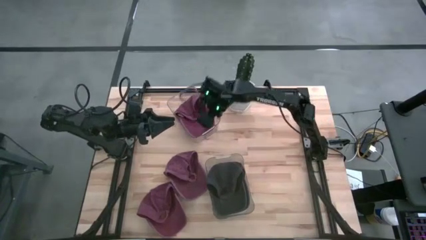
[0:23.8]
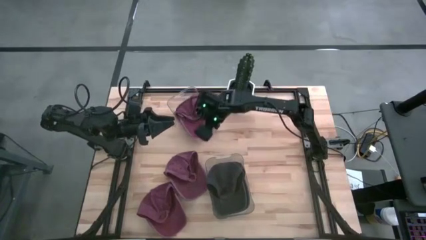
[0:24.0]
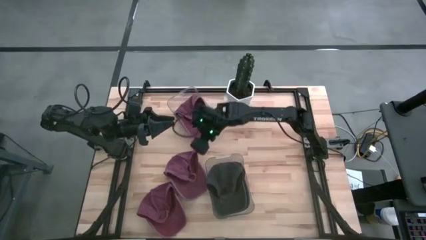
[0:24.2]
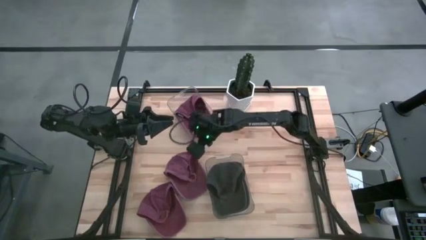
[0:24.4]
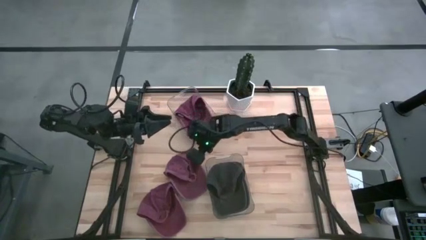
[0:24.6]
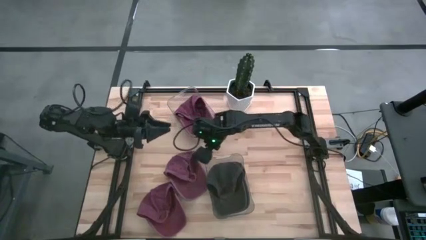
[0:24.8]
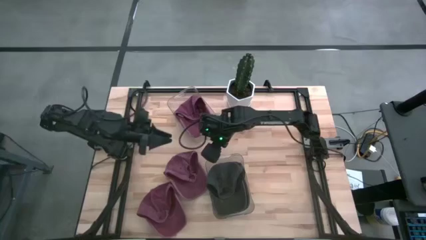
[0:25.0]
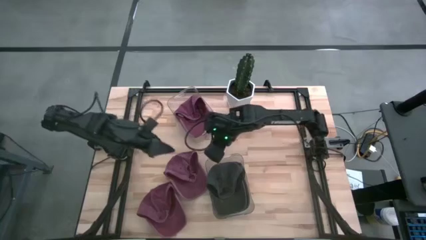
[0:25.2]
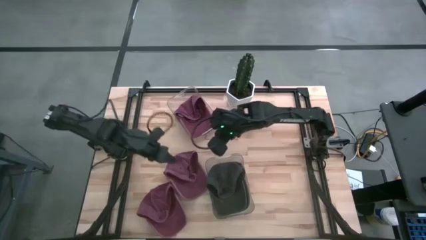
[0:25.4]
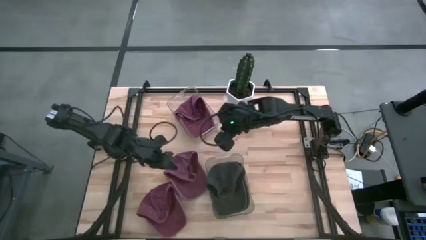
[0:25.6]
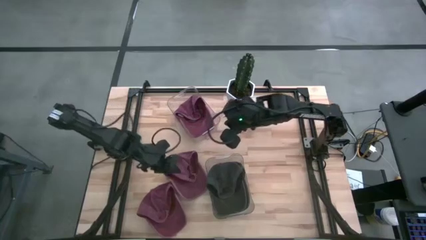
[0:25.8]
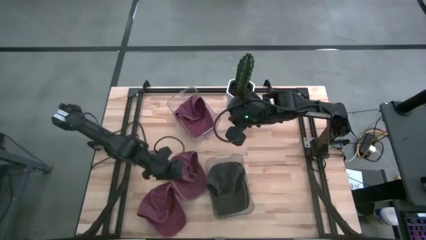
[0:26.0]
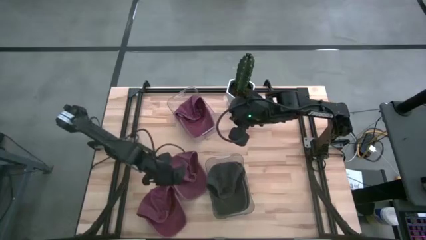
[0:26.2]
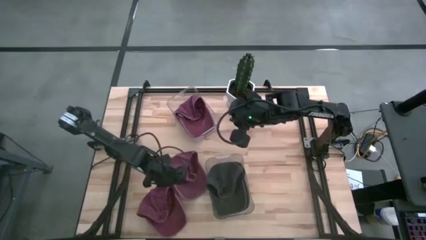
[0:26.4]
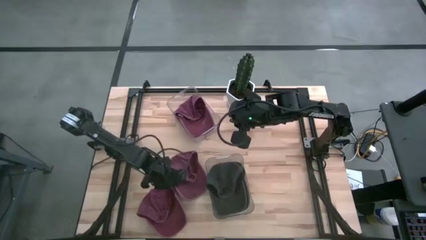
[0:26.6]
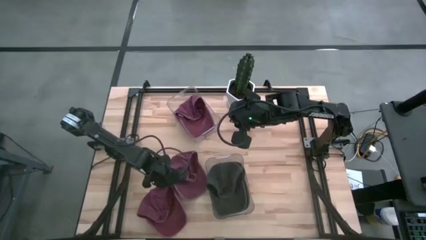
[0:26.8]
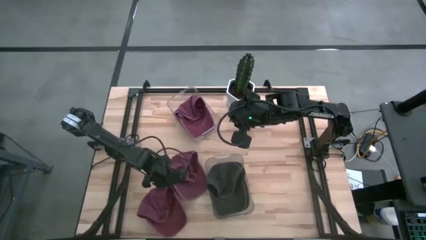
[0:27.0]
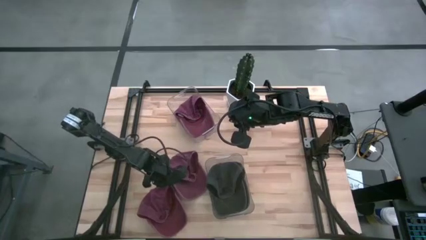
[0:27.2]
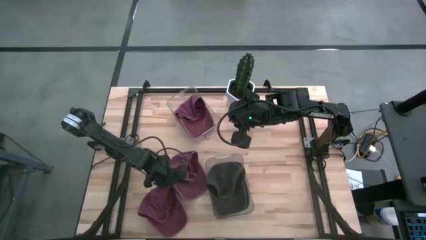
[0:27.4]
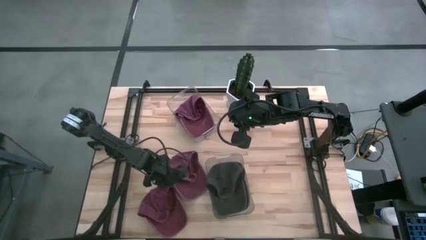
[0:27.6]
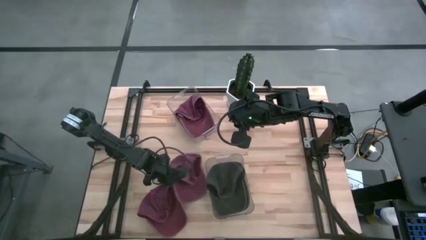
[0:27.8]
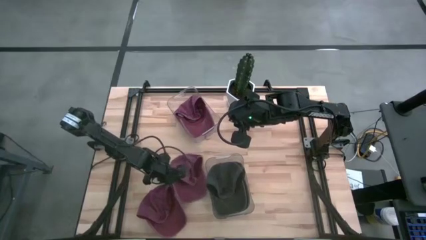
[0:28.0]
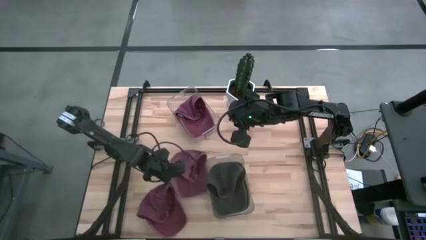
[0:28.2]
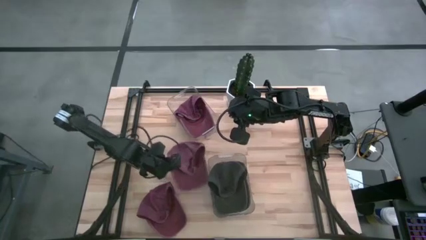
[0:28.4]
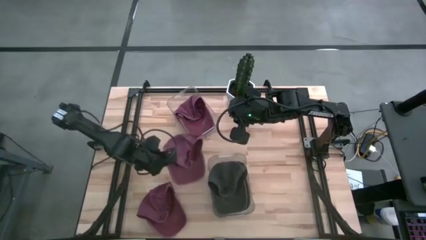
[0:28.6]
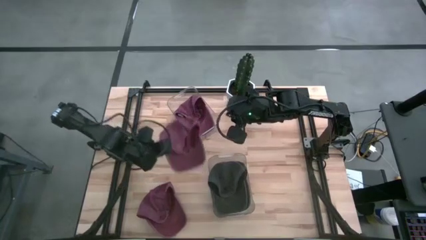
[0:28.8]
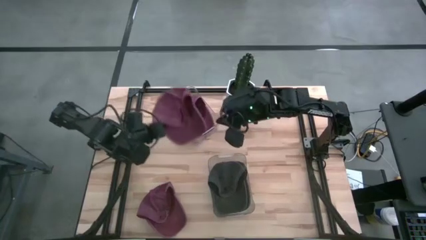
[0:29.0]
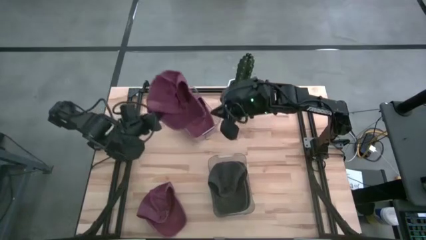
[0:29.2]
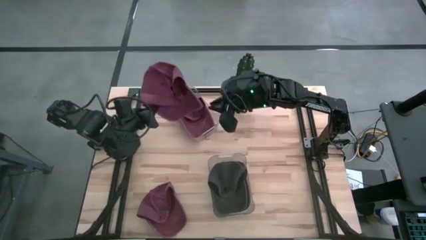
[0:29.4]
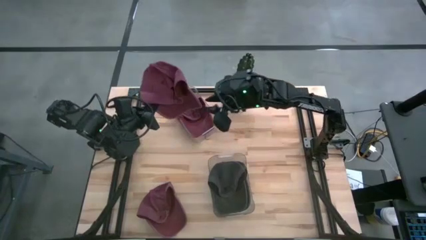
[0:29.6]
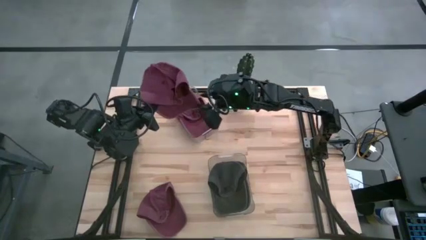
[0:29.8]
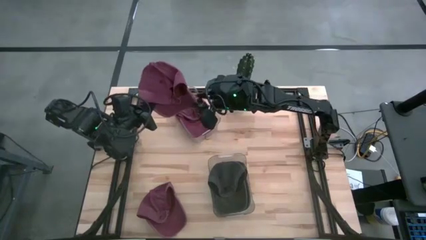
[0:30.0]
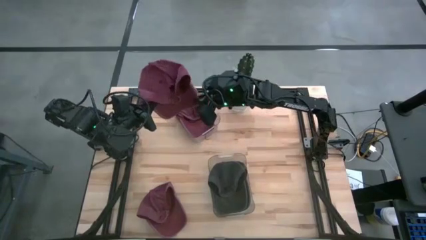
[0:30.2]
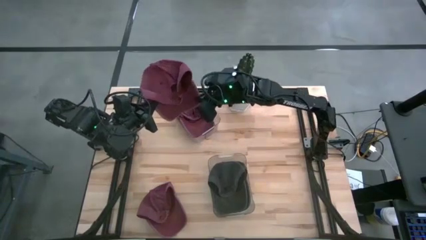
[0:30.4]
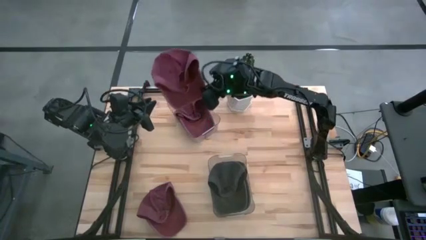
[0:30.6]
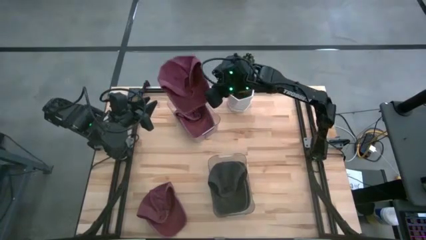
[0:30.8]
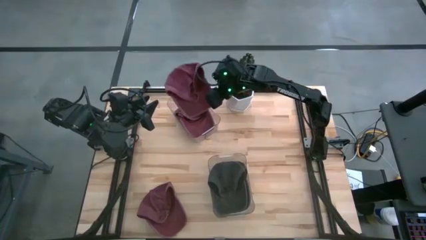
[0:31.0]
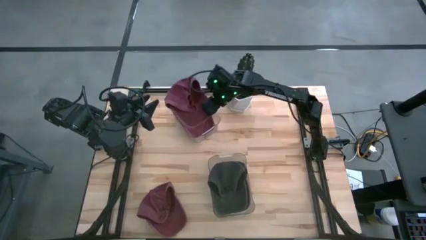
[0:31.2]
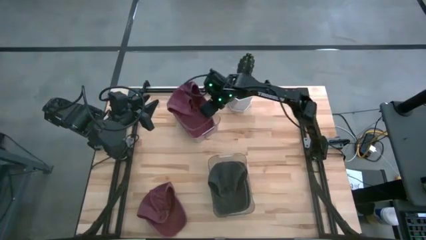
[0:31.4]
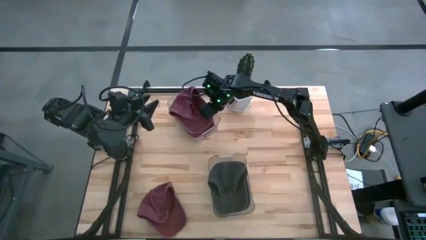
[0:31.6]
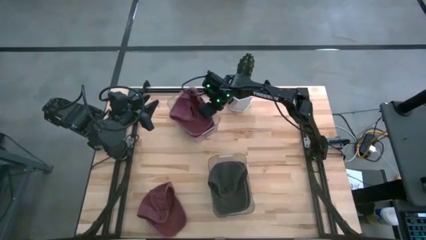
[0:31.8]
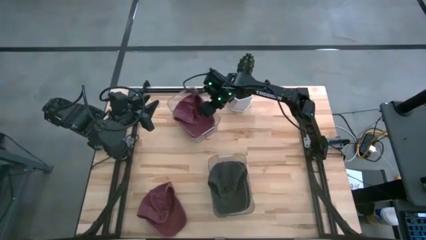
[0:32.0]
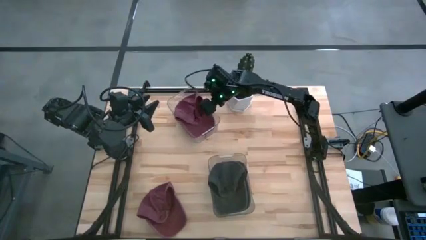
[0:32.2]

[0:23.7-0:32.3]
Task: Pick & Place hat
Put the bottom right red cap into the top transparent bin

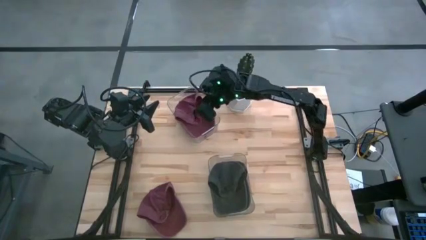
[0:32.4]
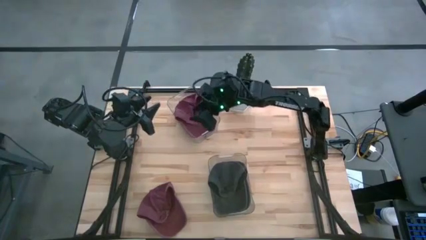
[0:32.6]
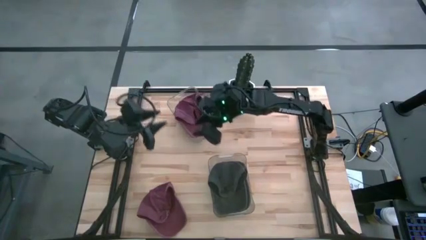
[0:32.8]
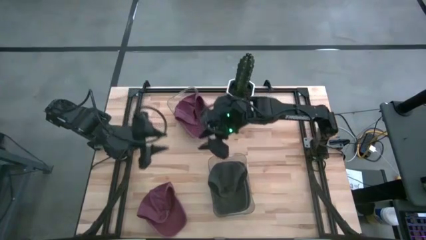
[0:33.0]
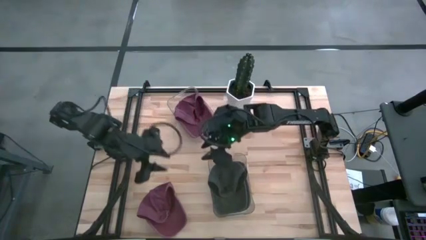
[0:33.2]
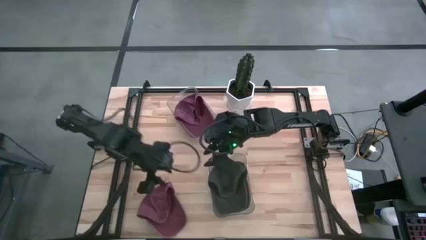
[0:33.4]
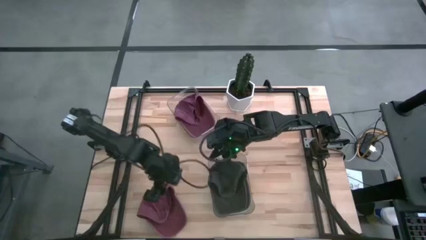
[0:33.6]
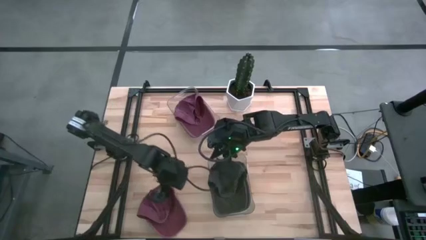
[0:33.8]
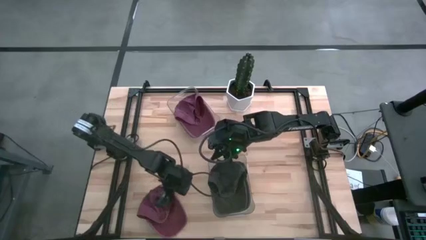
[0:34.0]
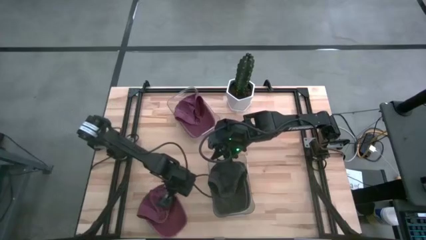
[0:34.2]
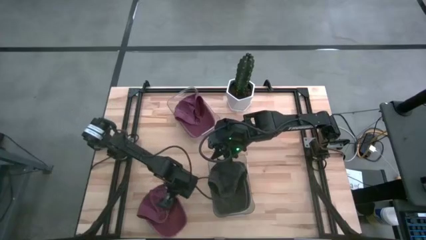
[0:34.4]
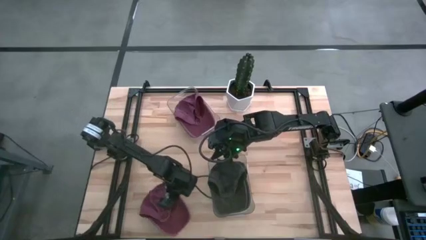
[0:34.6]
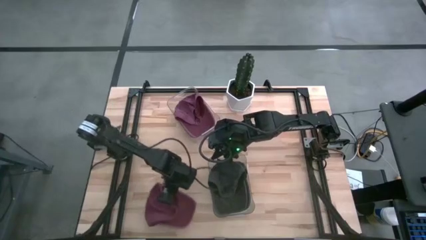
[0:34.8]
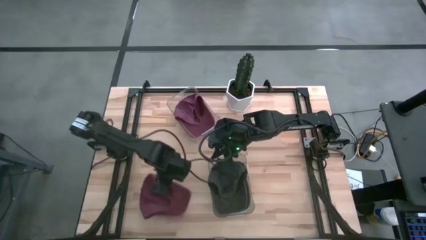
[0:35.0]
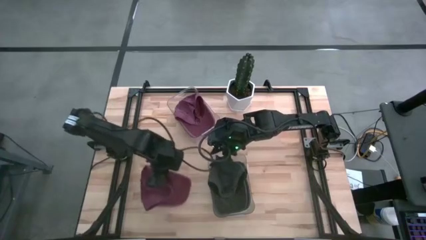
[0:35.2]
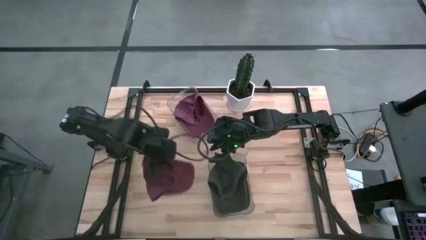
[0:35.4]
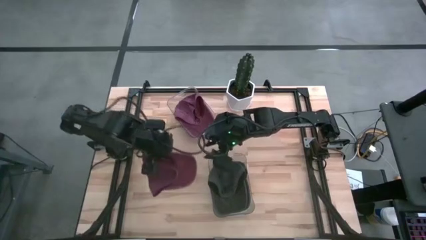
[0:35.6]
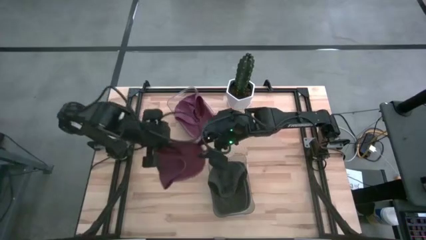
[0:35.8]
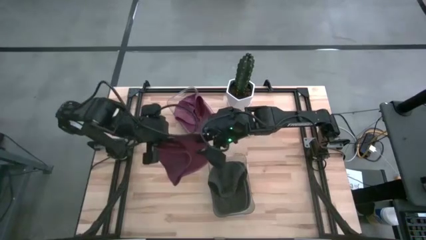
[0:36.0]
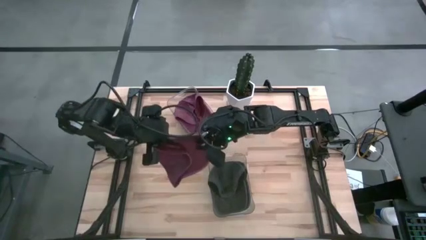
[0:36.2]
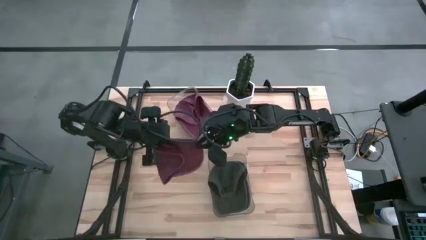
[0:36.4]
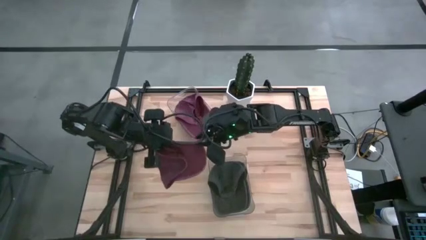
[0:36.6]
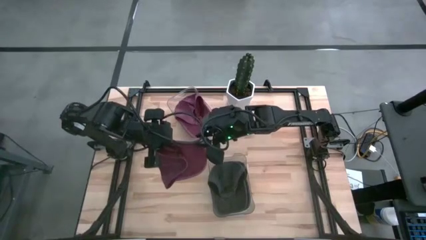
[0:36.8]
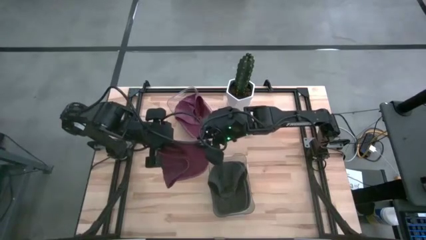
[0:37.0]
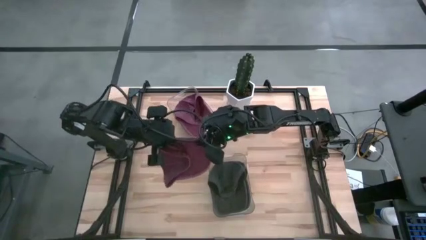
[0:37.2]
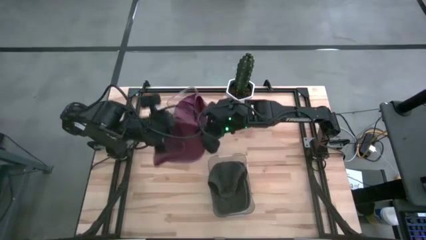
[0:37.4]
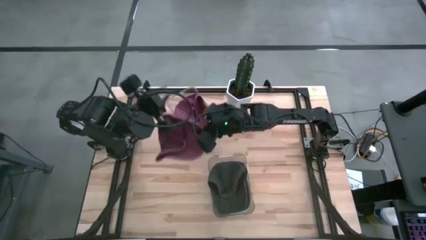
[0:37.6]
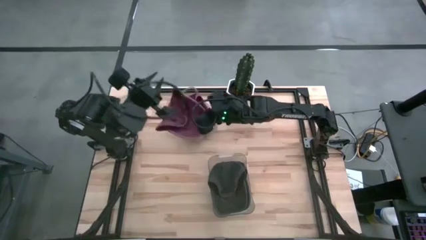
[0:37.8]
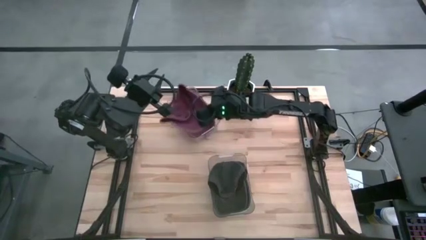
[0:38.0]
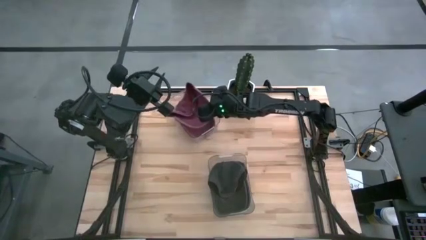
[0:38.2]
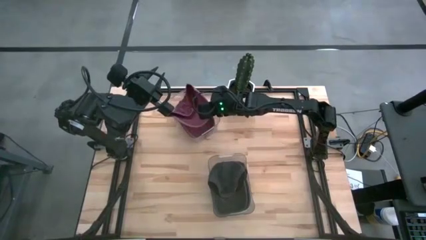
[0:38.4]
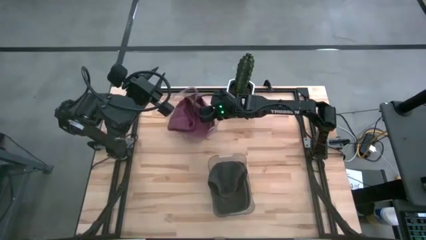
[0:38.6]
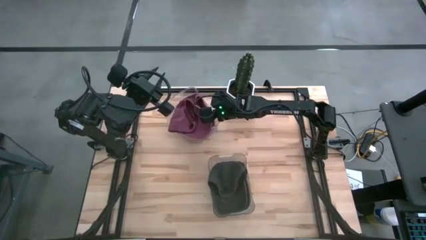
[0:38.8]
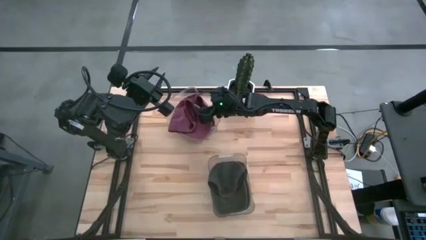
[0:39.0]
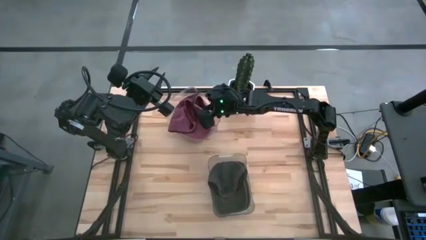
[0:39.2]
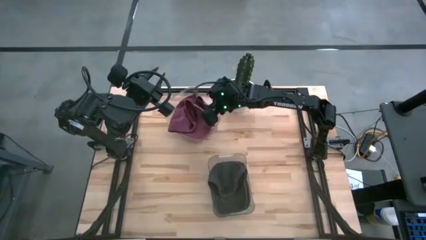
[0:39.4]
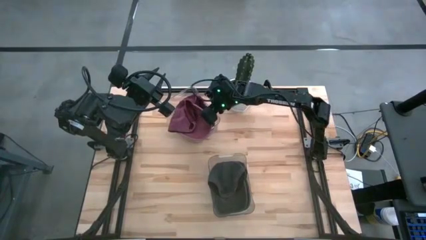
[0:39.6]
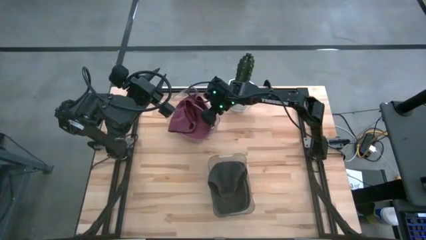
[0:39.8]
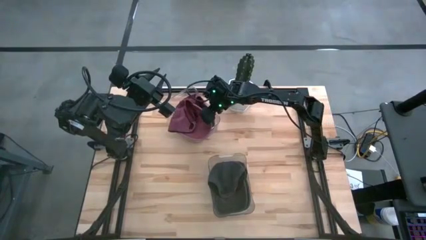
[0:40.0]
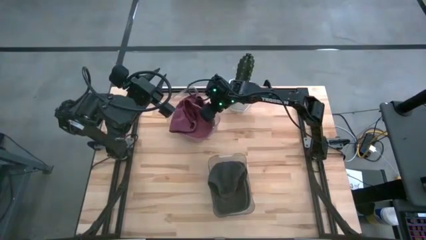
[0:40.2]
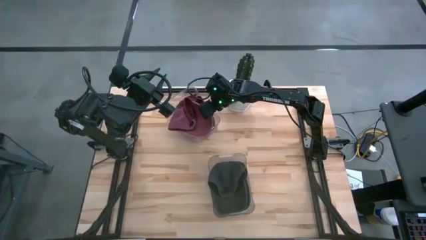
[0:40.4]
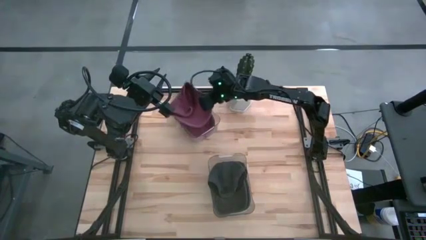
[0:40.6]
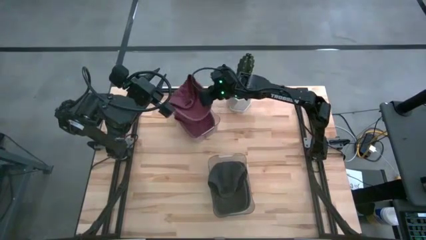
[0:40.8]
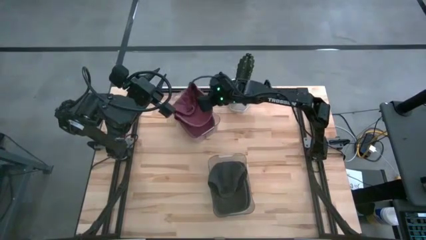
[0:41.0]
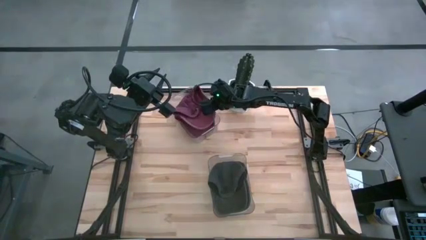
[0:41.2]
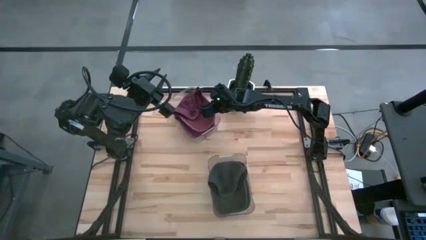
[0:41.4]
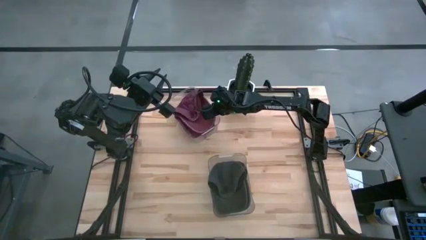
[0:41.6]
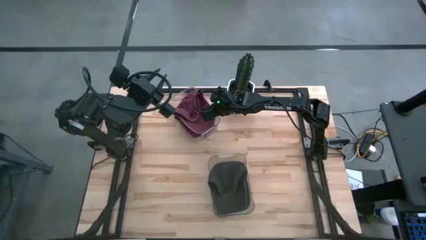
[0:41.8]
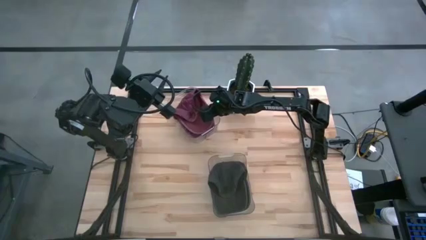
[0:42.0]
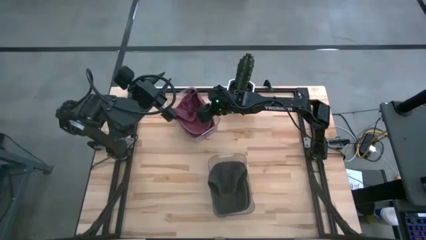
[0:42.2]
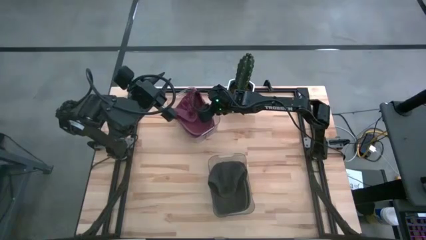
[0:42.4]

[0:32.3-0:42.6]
Put the red cap into the top transparent bin
